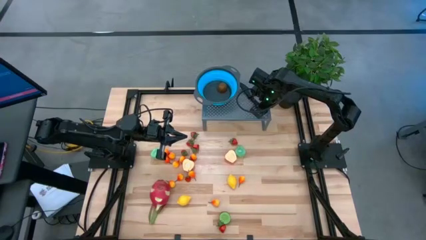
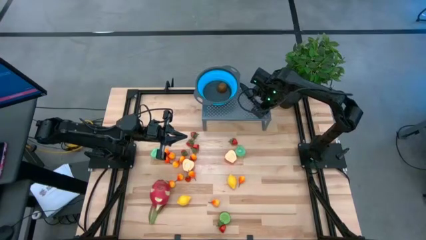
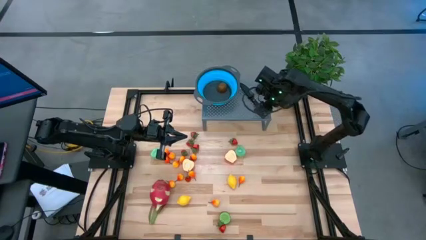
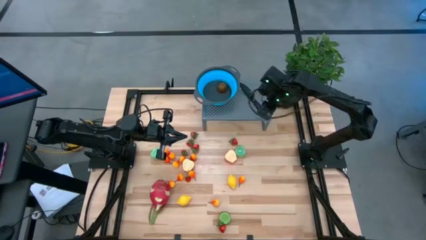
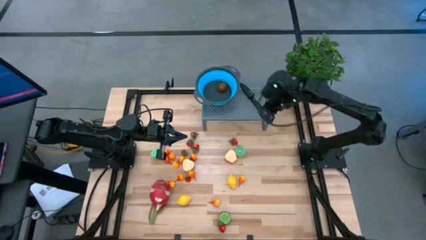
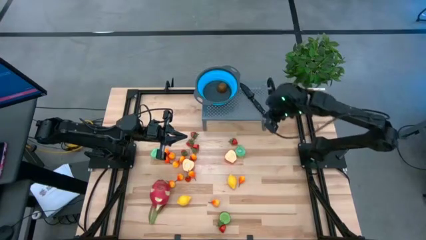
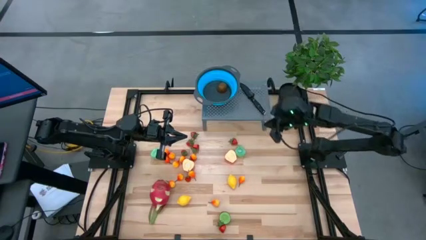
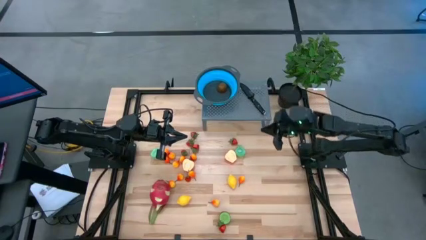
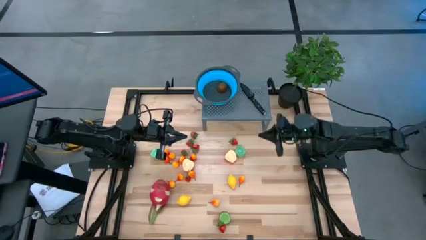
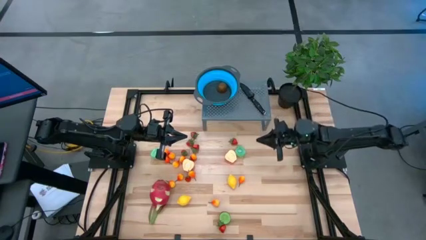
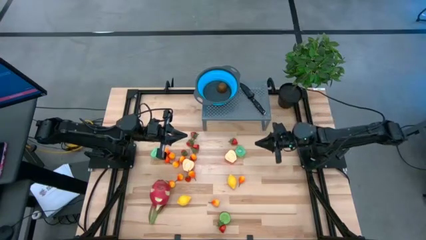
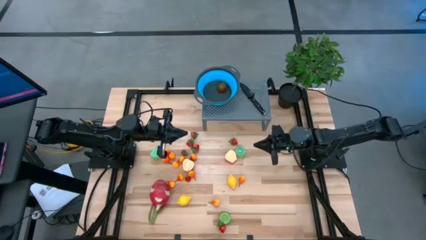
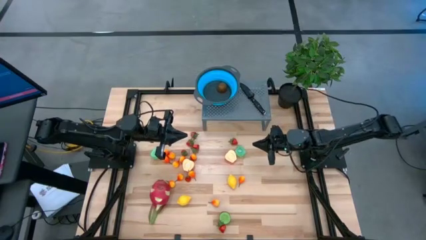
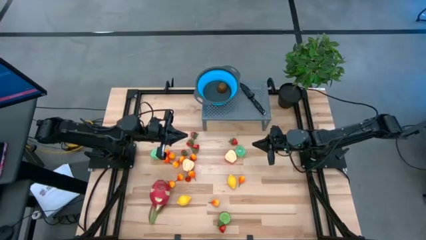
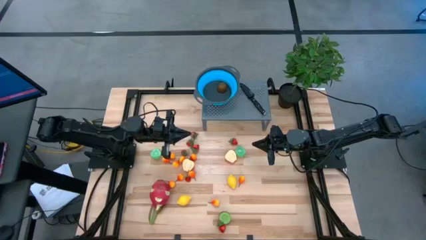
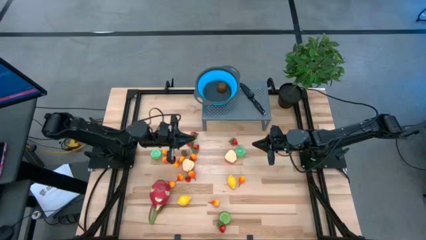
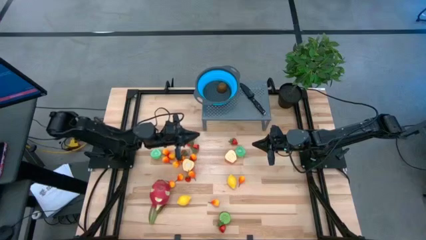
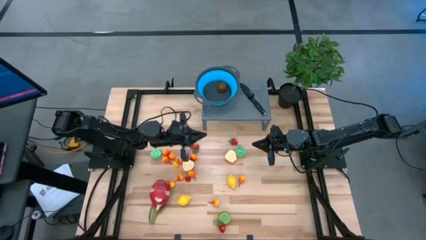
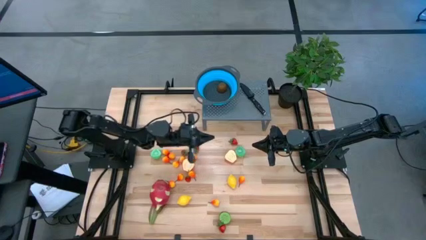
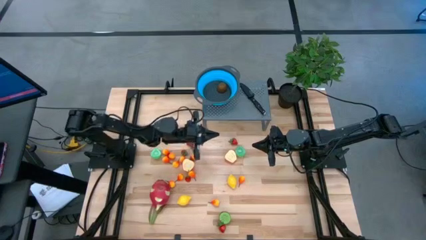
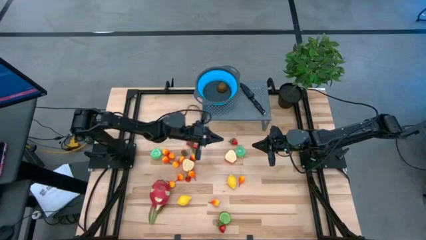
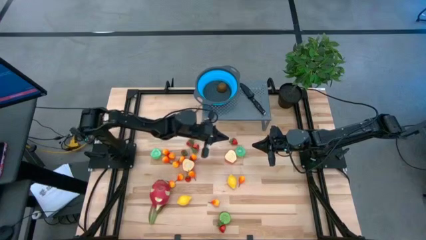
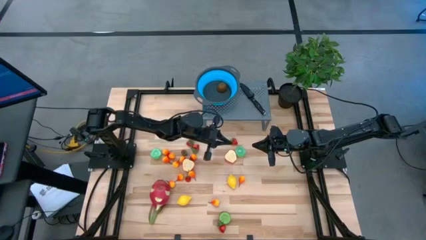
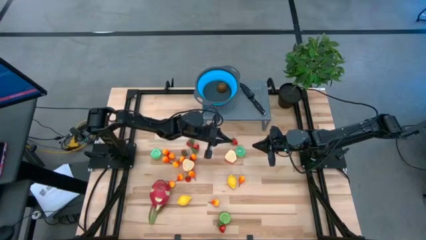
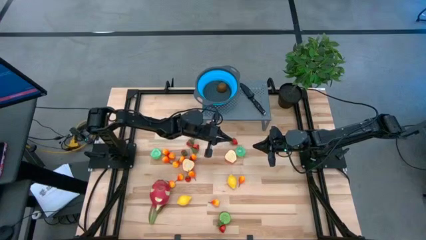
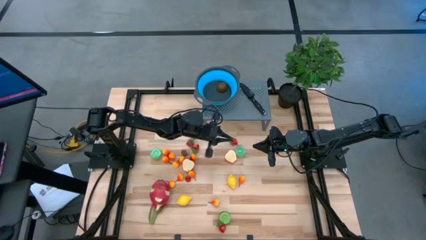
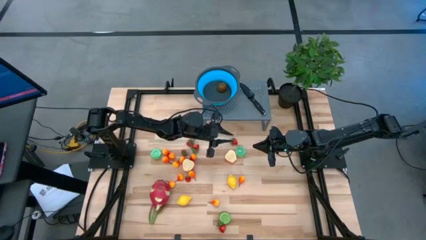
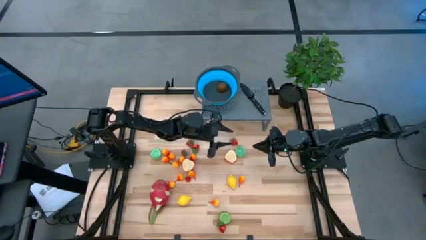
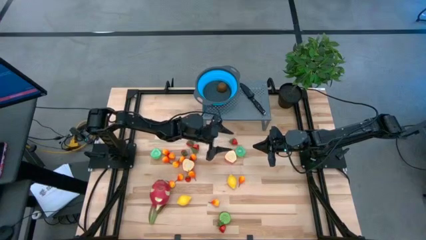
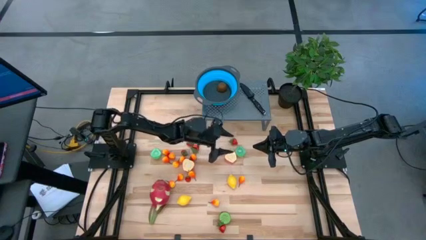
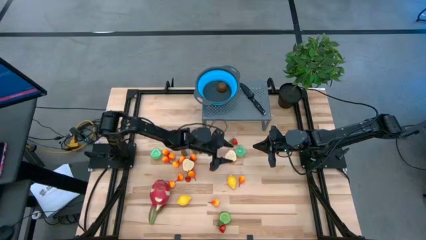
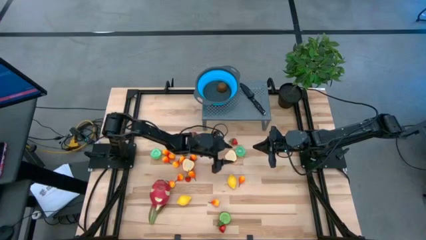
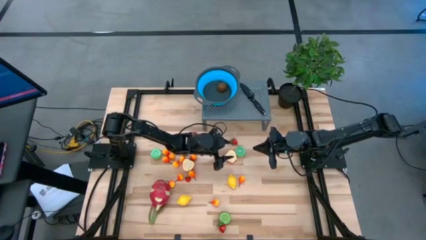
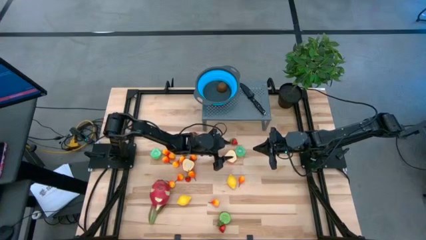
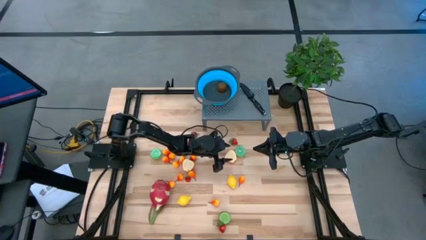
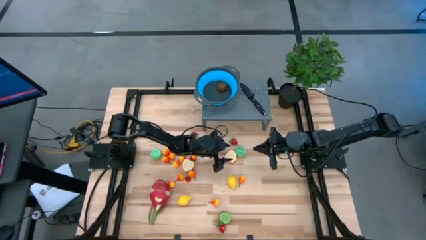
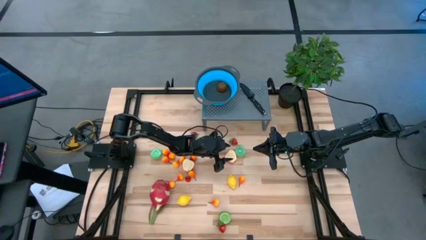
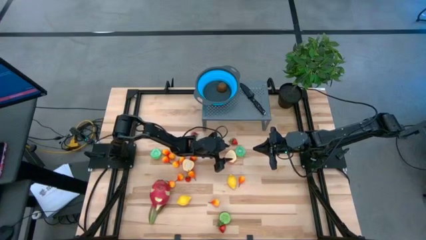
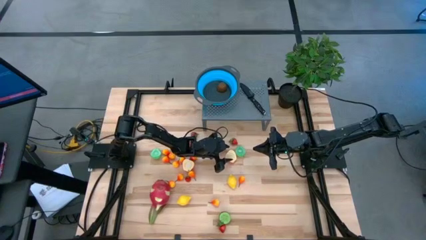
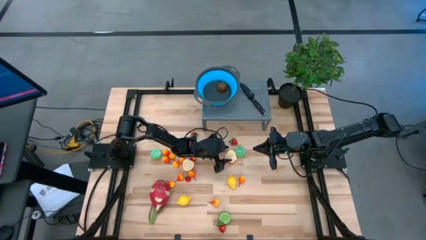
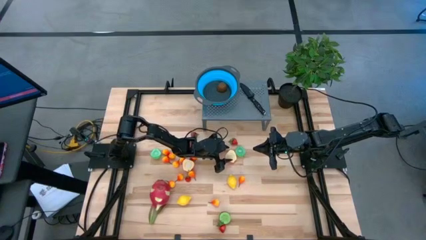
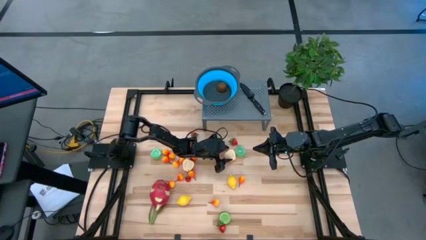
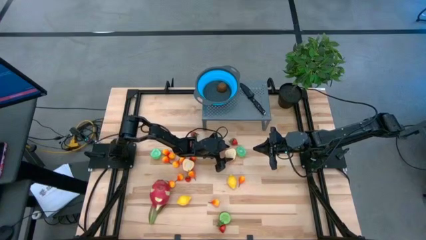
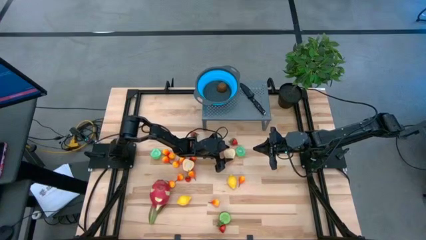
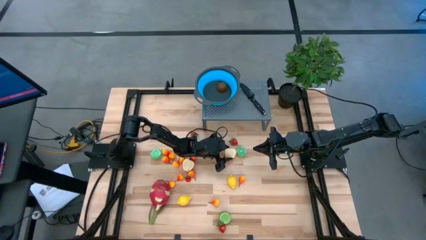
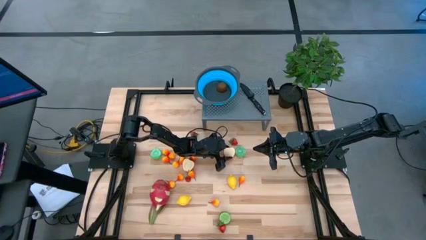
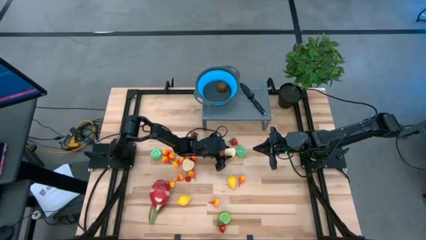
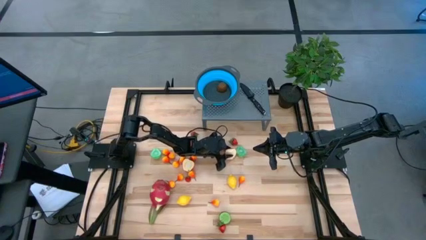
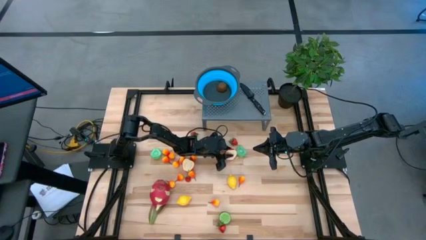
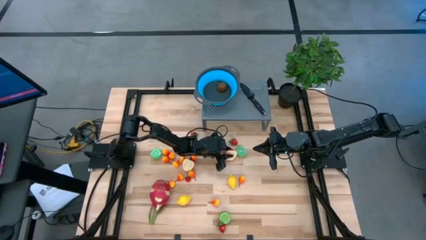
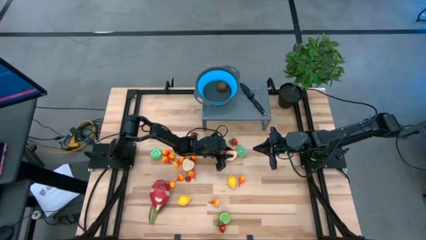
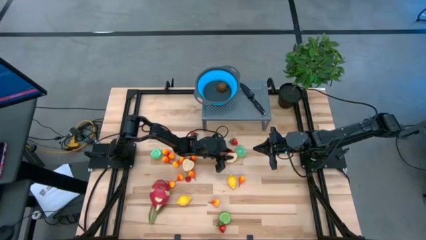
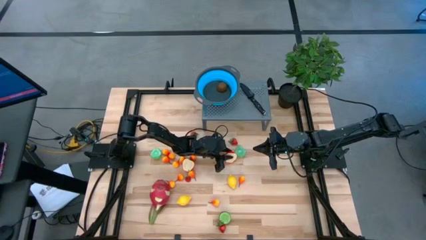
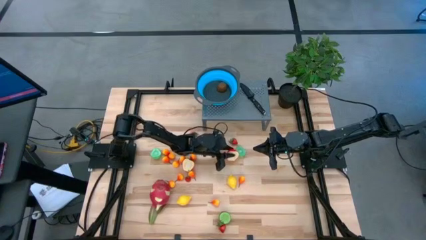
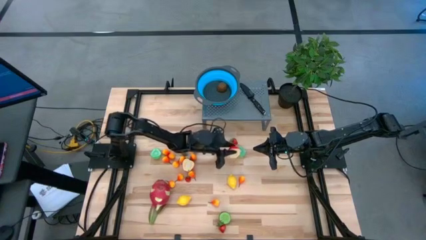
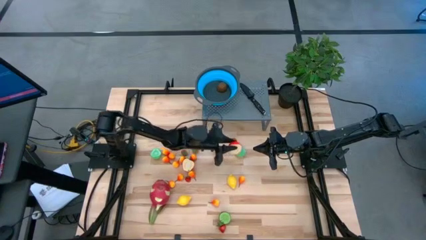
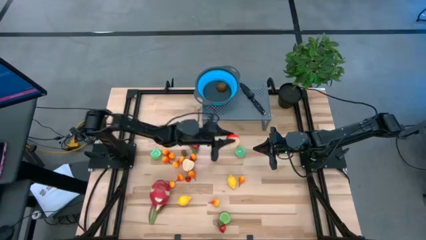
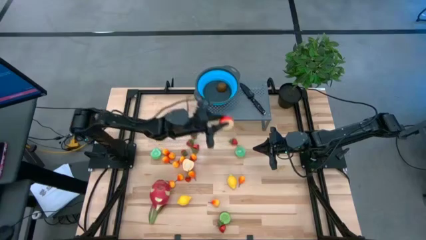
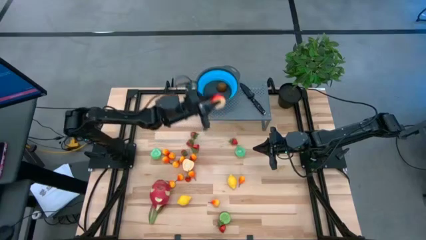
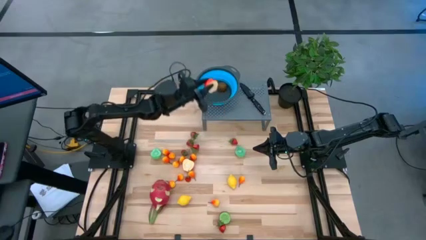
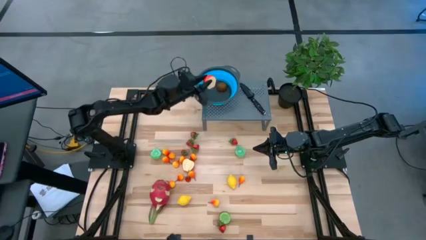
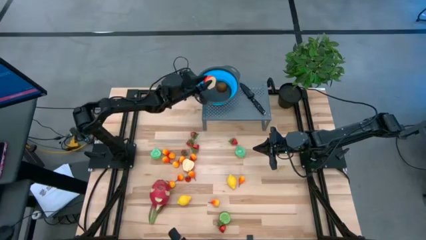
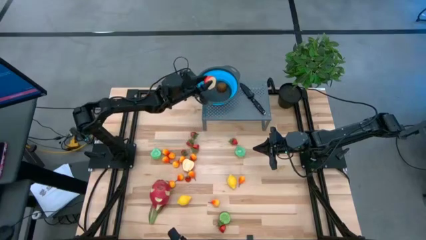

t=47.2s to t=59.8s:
Task: Pick & Place Fruit
Put the right apple into the strainer bowl

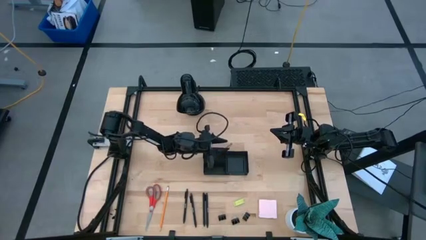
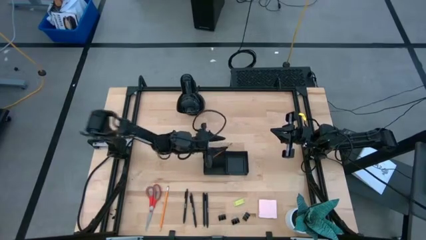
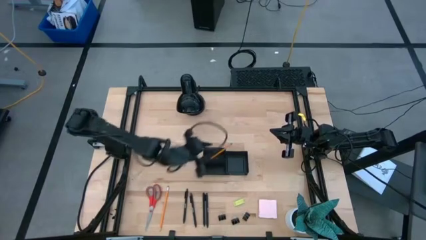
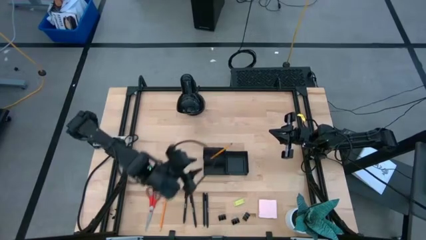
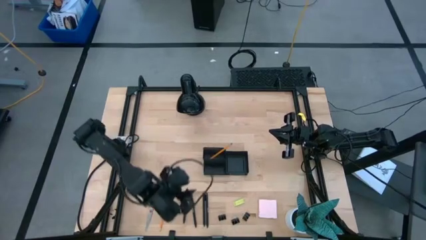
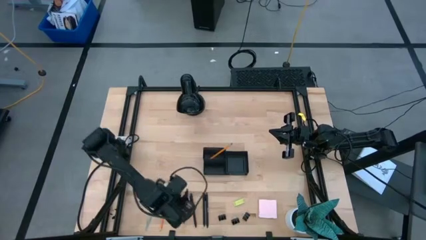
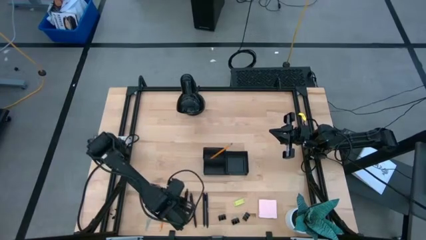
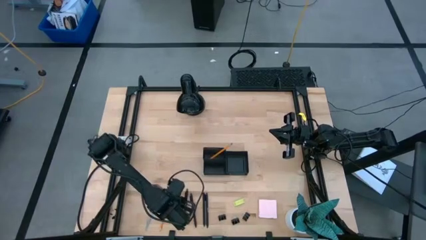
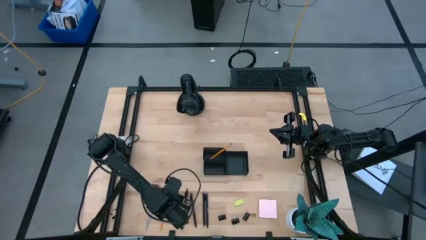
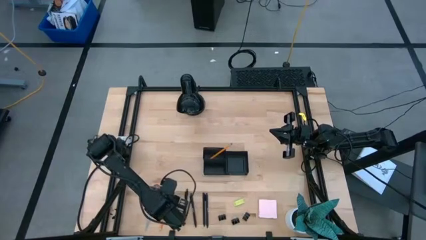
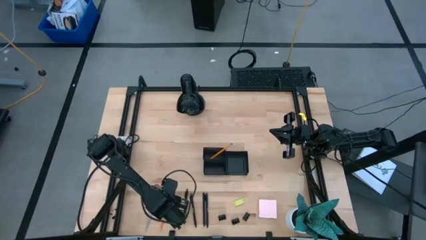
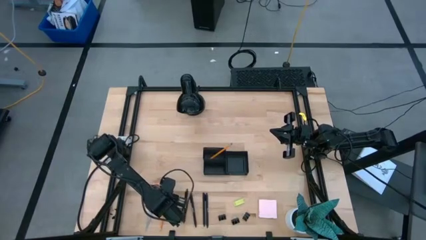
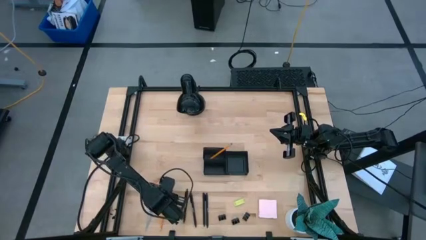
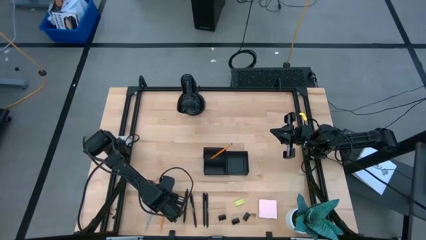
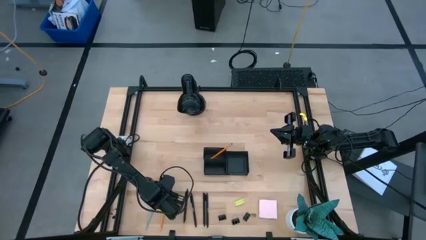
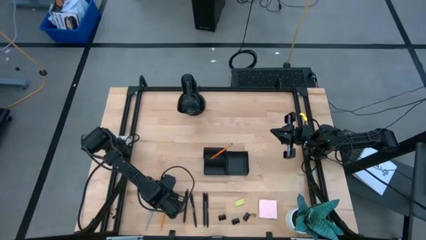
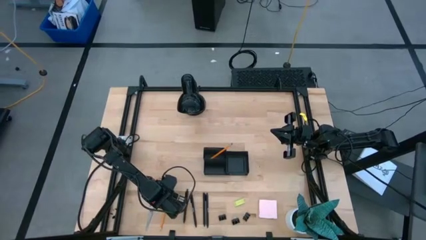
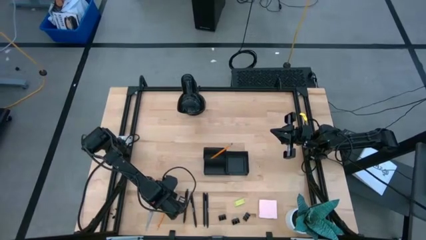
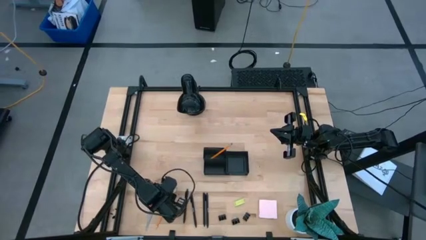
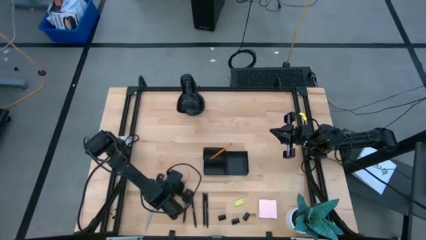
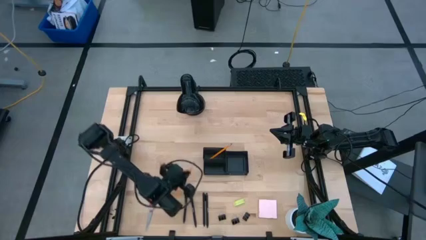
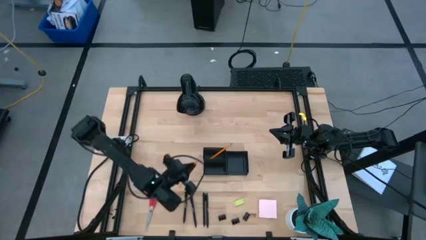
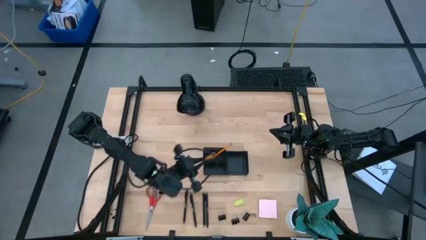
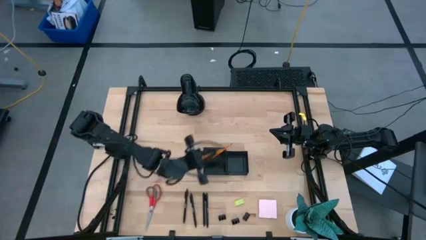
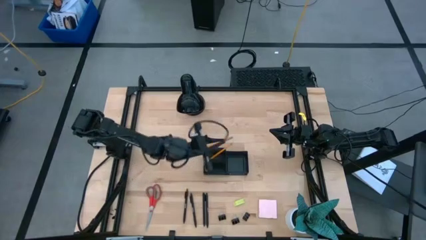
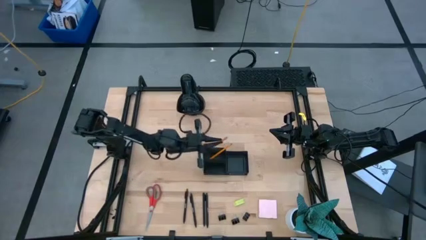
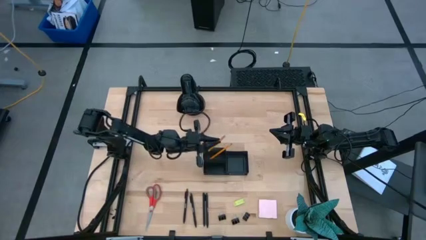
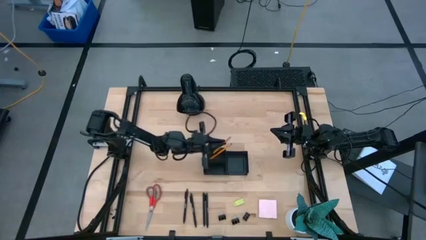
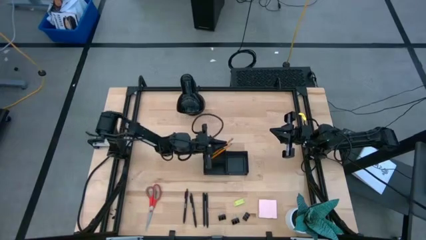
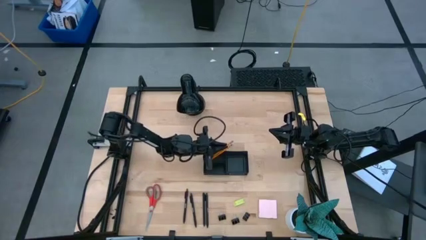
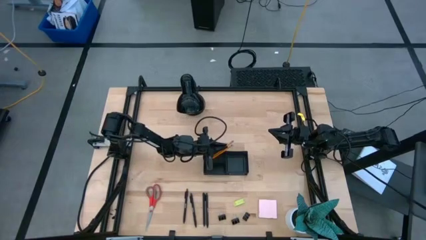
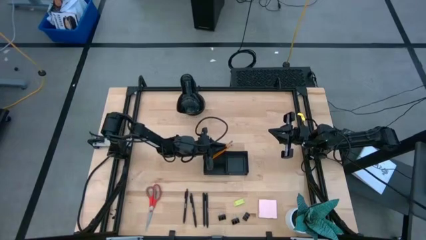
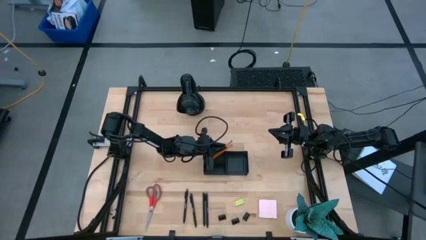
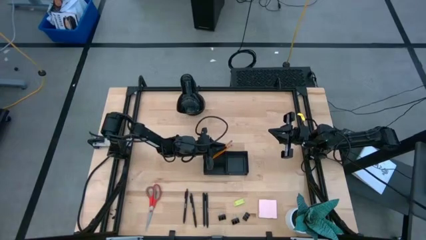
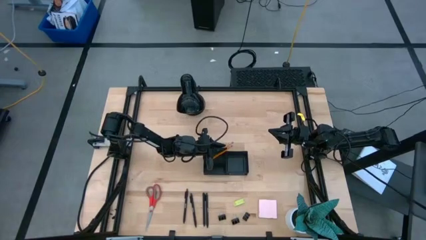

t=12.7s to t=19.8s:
Task: Pick and place office supplies into organizer
Put the pencil into the desk organizer
